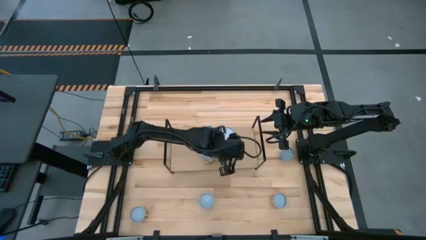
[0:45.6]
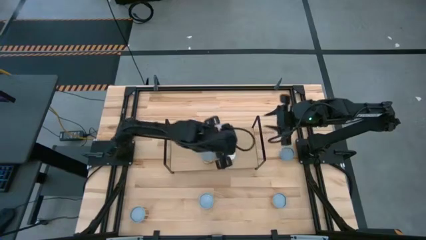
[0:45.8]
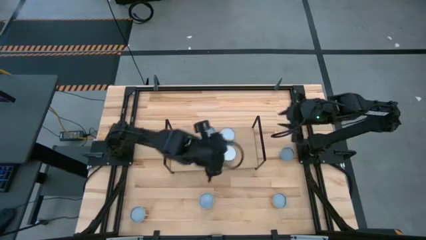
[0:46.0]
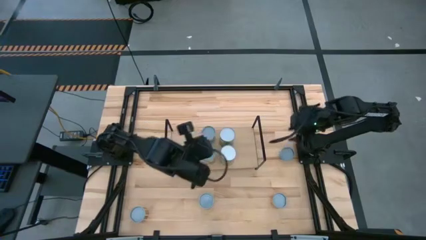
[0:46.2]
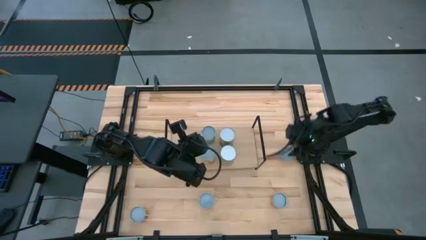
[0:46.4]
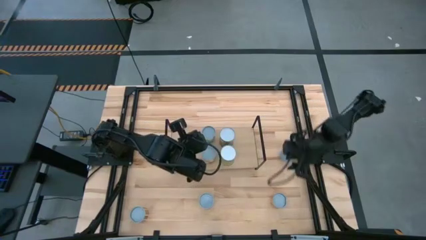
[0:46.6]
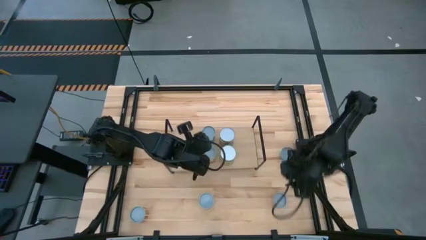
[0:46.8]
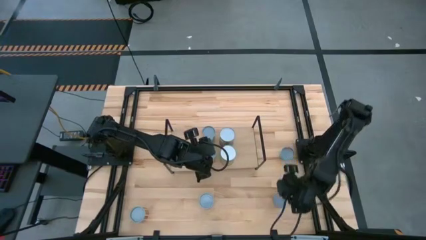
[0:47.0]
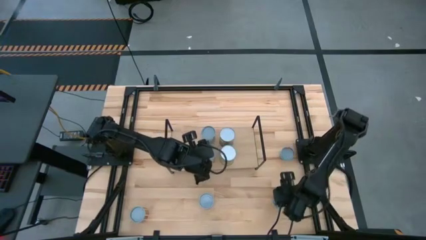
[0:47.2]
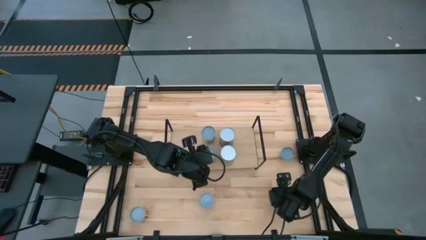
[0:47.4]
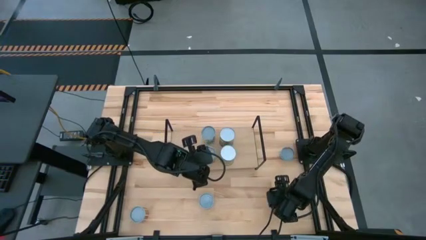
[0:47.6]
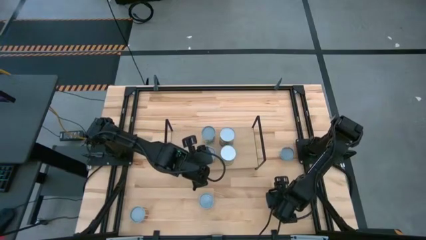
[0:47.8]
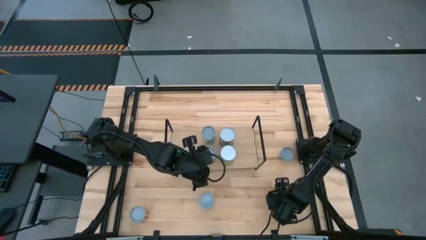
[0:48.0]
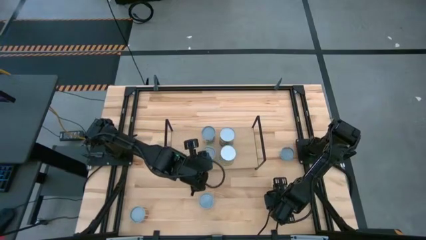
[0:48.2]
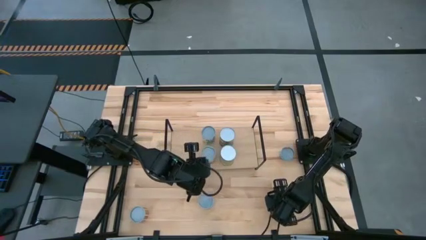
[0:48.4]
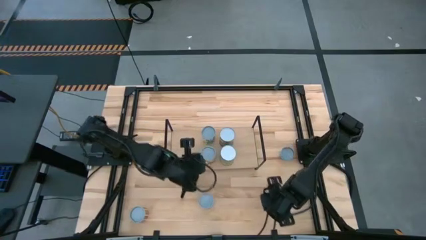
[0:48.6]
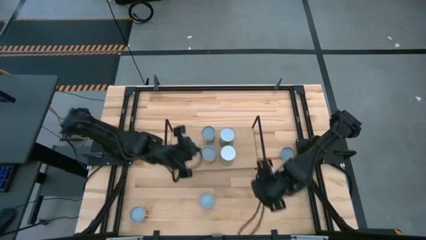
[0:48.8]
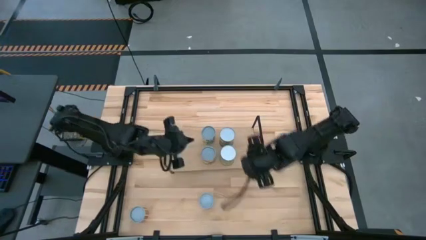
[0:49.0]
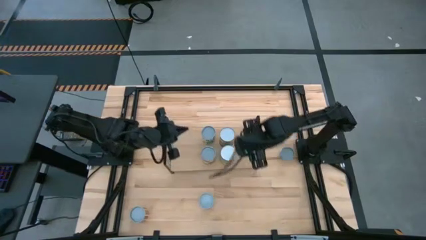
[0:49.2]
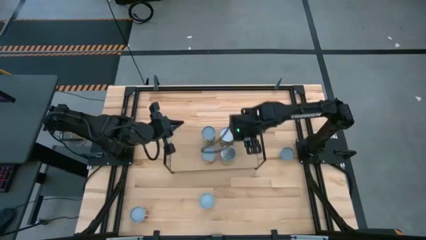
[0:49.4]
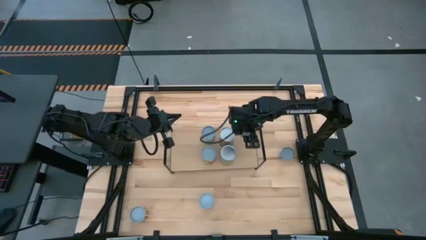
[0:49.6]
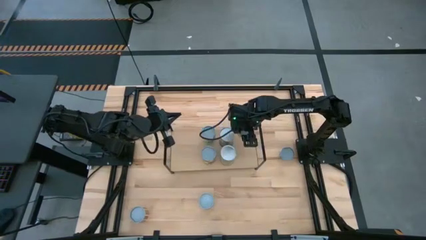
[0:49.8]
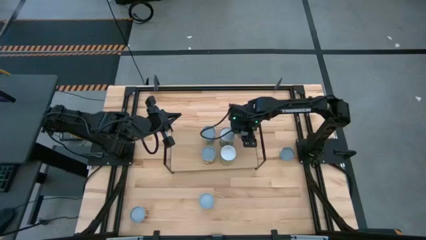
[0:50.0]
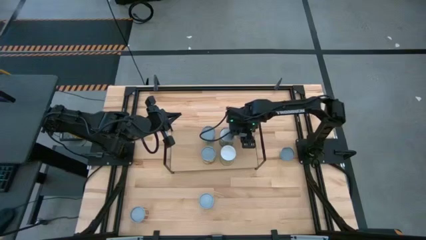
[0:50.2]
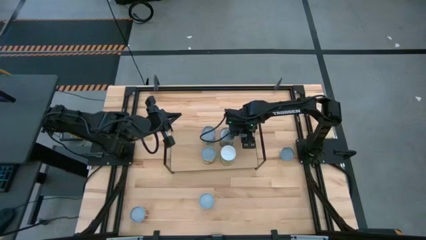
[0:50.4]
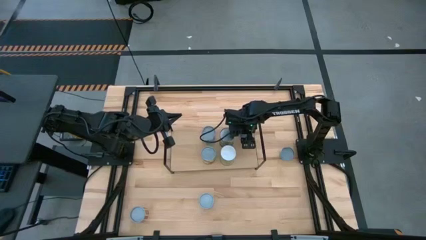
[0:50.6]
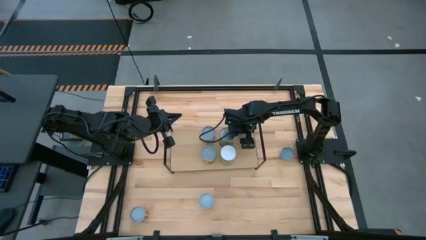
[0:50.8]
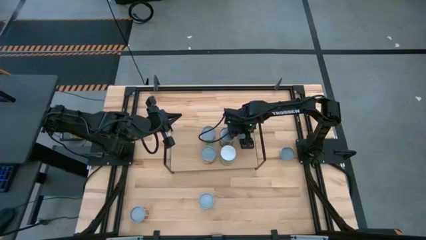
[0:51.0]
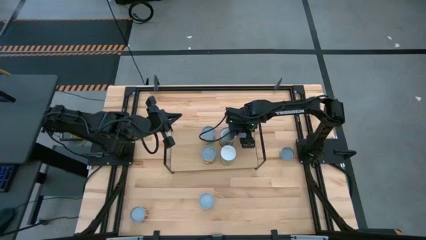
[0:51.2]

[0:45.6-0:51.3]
Task: Pick and place cans onto a shelf
Put the canned pineapples on the shelf

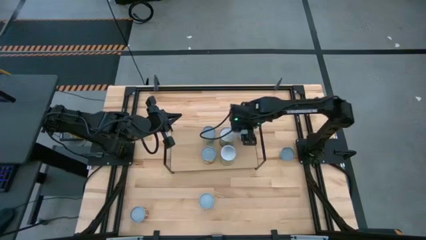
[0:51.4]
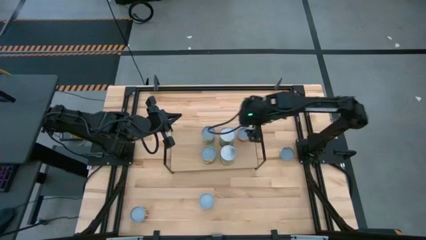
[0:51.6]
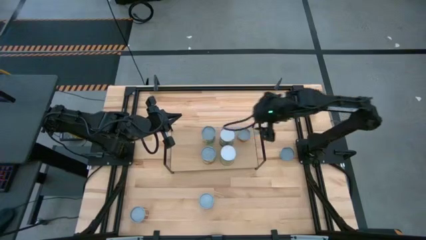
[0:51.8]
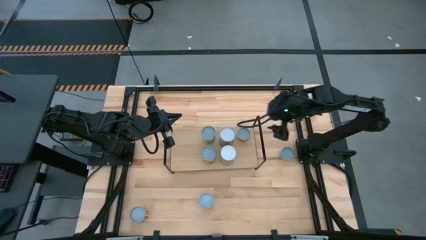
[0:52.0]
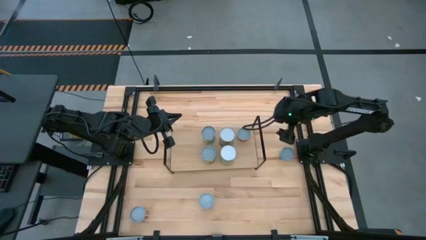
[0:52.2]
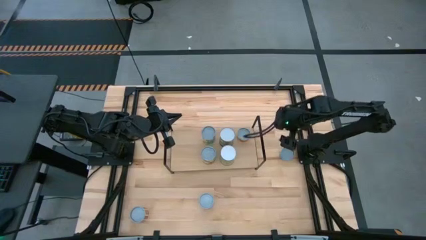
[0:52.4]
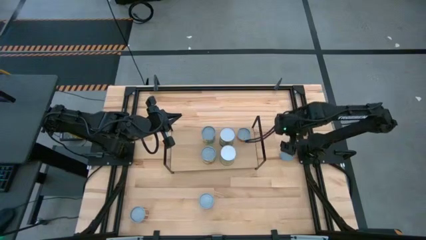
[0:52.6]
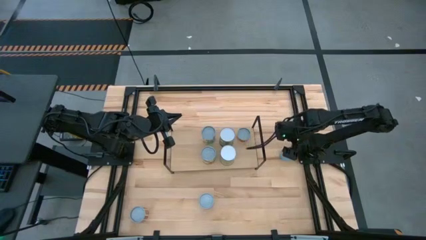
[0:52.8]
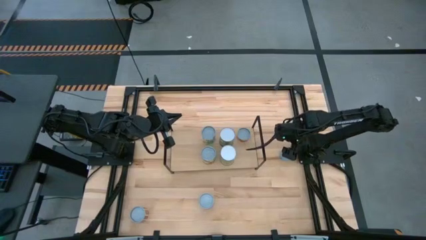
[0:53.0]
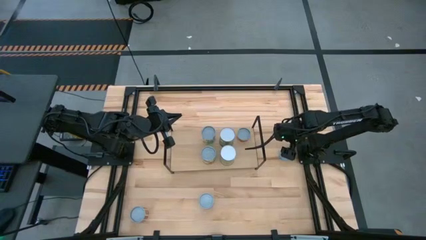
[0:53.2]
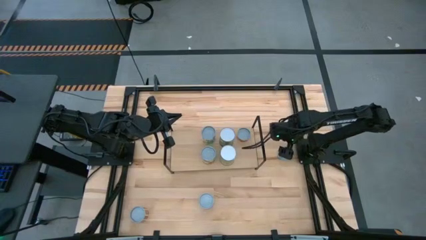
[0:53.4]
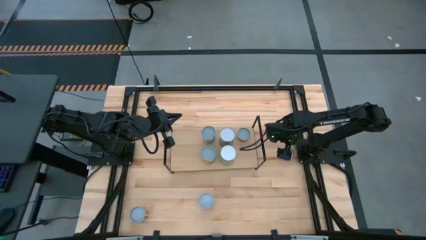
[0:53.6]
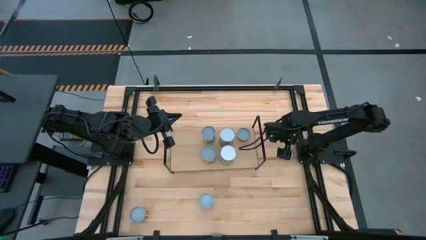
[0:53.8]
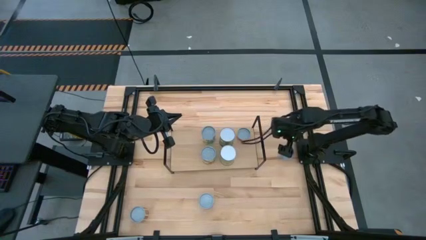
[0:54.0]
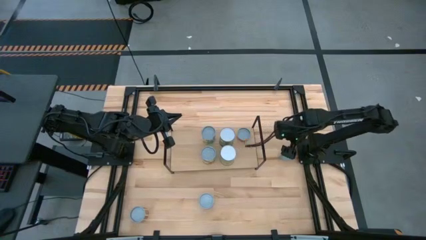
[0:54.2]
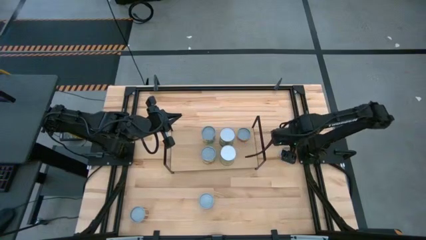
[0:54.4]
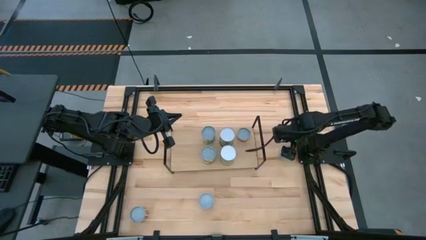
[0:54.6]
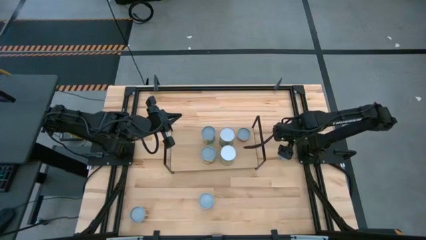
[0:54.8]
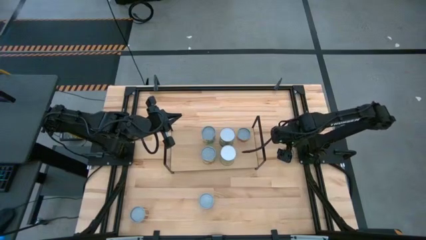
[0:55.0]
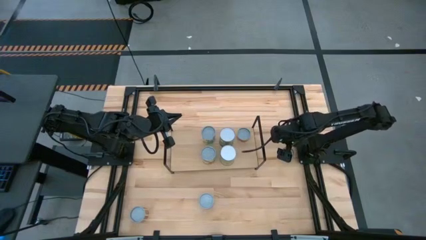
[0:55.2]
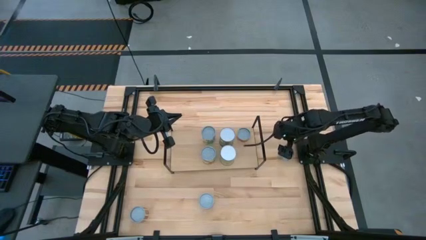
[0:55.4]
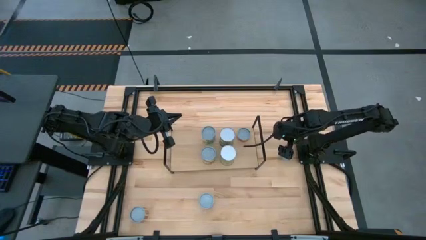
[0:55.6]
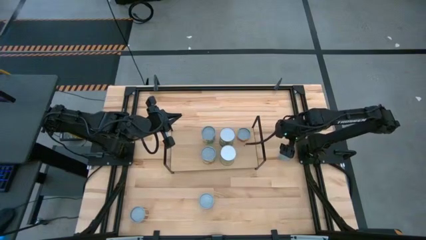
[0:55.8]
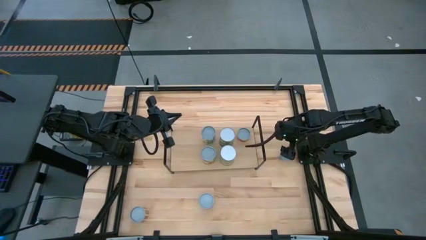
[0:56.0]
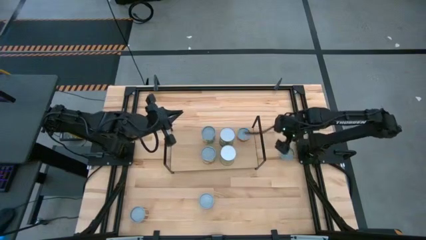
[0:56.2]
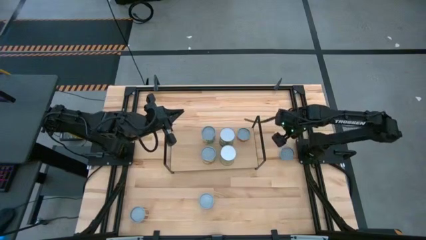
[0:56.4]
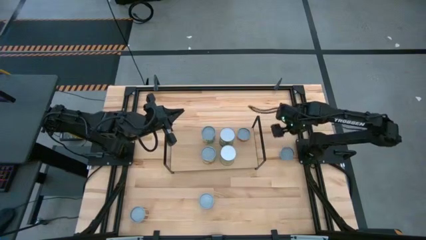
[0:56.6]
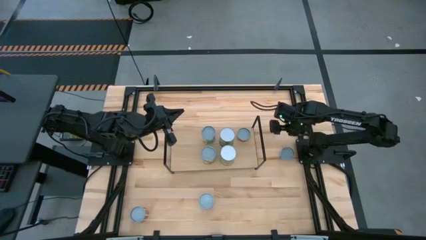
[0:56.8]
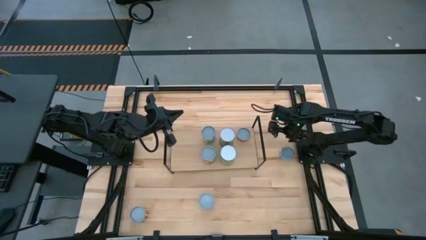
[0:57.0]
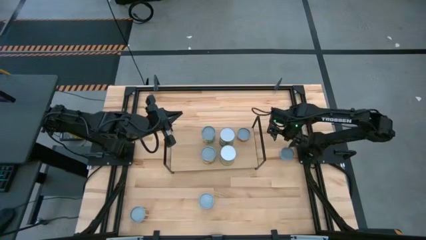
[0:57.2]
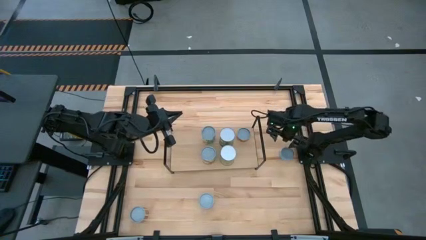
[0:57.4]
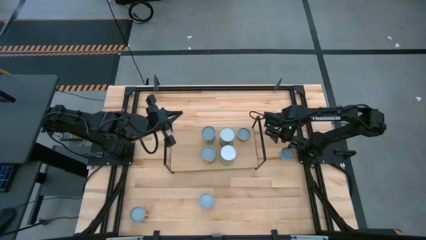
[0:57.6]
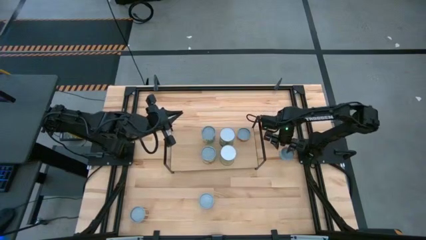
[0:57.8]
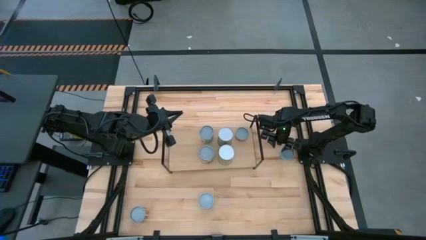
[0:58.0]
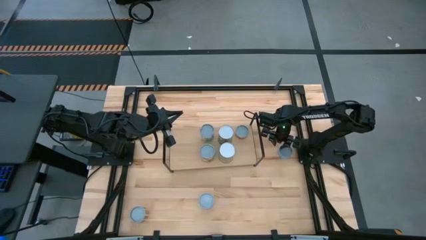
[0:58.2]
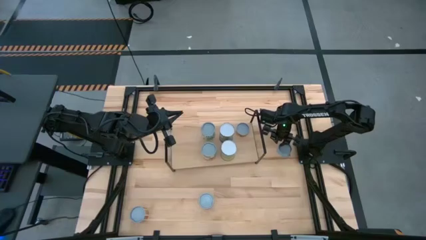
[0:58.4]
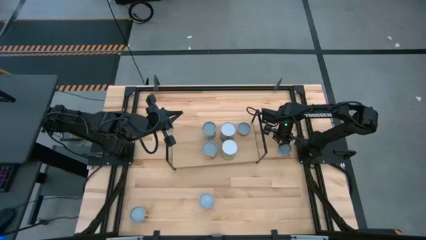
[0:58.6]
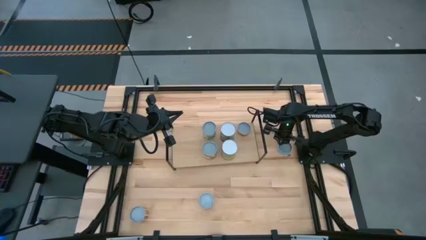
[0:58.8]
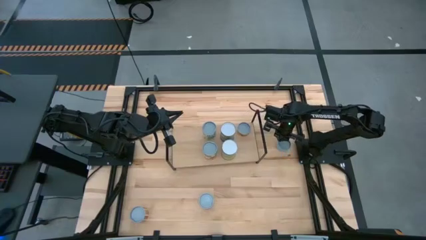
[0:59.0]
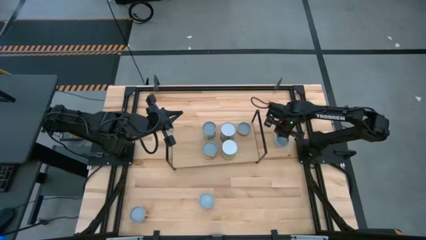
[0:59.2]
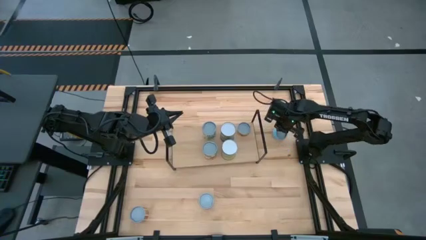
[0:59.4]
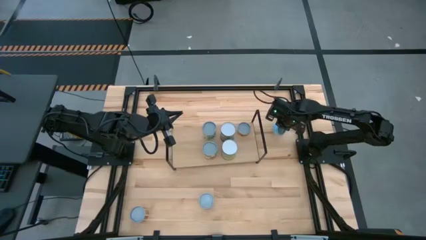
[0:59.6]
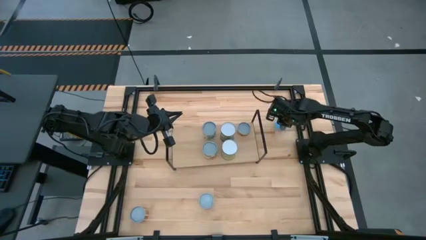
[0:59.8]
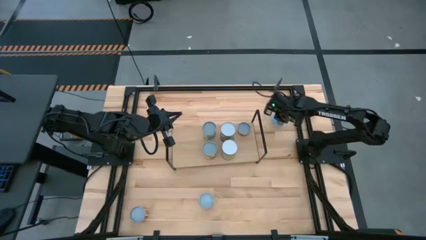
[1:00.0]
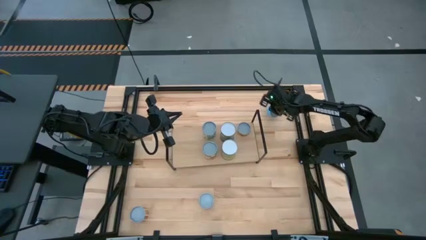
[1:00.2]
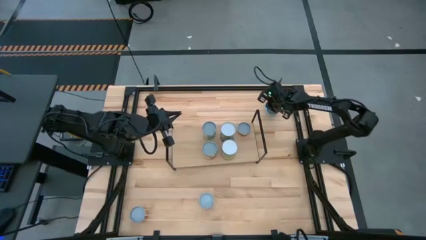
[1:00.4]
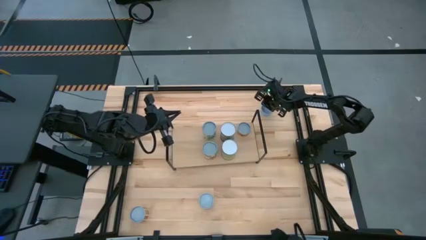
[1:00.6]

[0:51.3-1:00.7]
Put the canned tuna on the shelf

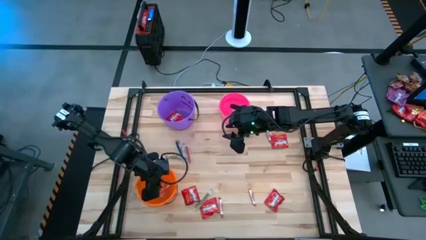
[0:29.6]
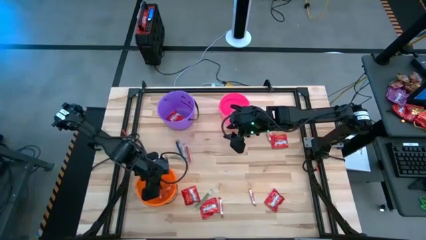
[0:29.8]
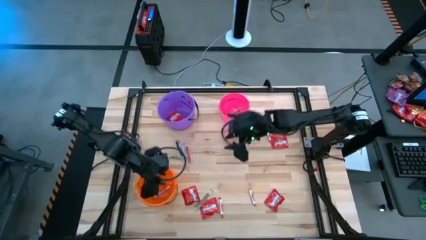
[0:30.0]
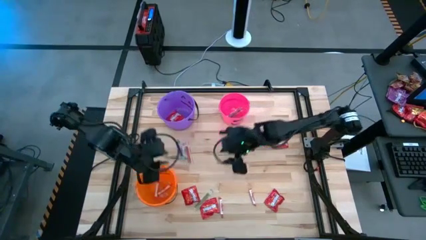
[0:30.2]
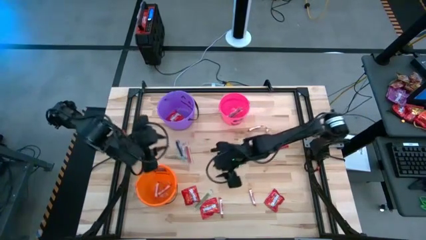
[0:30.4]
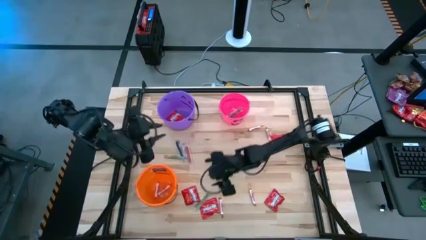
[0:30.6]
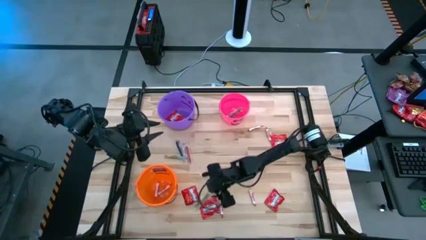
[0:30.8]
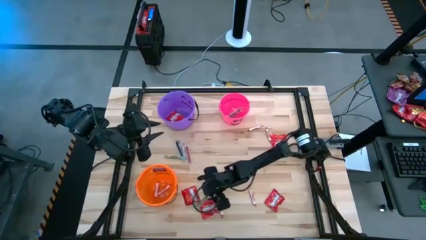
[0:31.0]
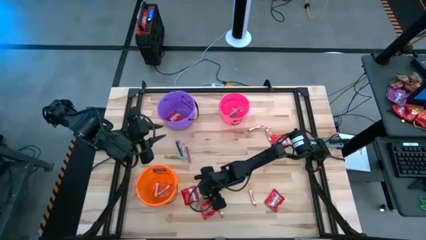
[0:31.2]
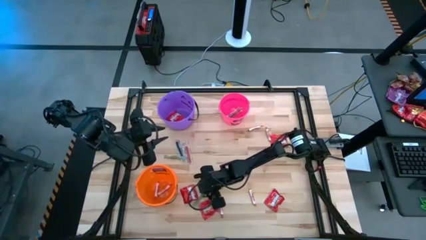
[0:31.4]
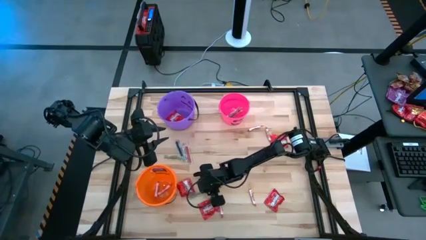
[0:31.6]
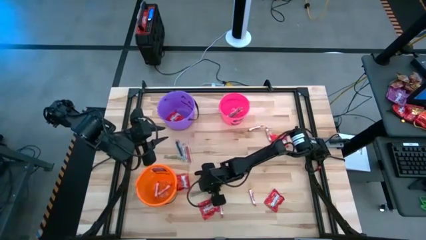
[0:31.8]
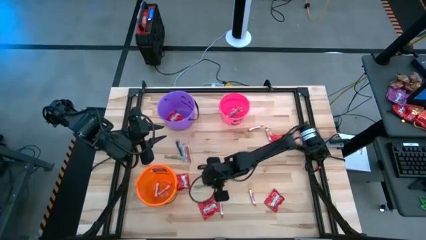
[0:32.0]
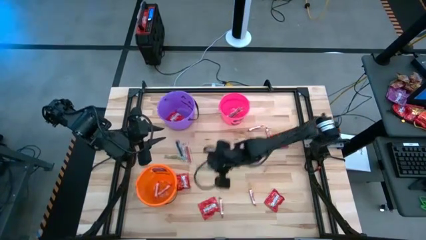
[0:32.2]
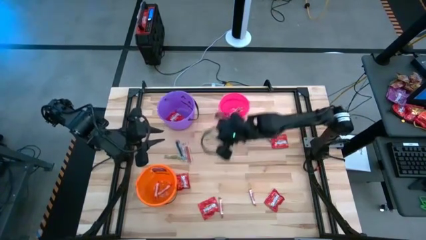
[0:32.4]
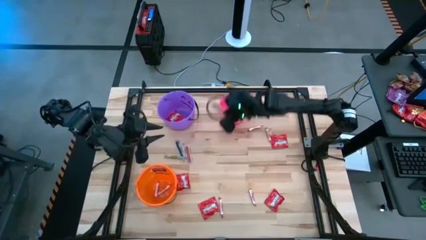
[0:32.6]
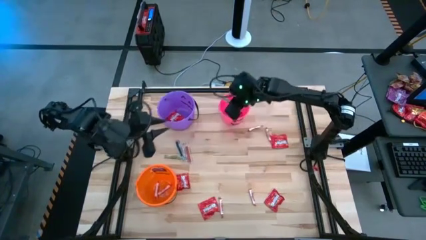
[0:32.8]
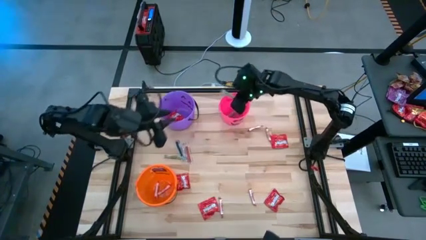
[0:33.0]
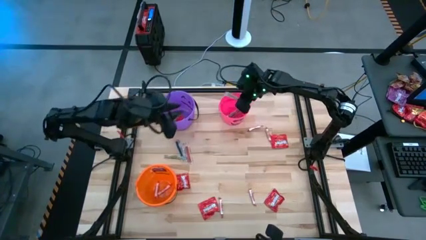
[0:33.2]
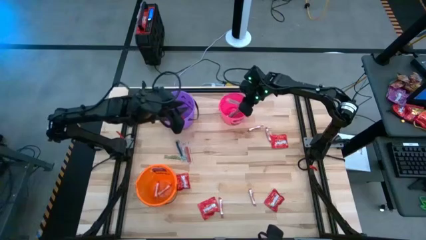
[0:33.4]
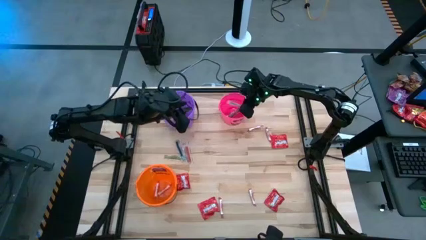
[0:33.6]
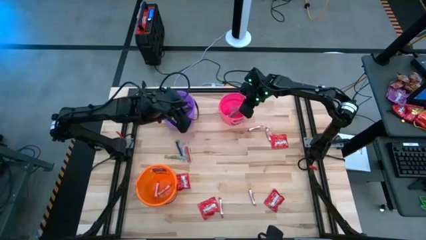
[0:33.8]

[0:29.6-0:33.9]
Task: Sort candy by brand, put in halloween buckets
Put the transparent green candy into the pink bucket
